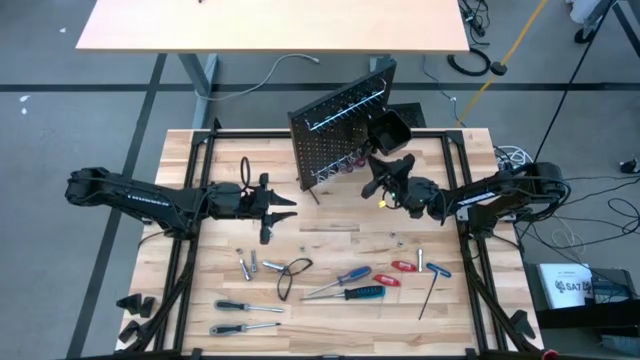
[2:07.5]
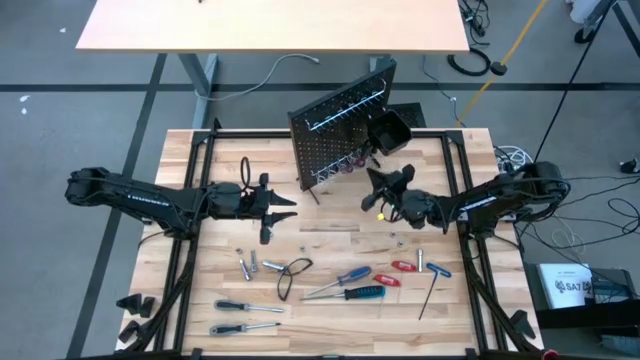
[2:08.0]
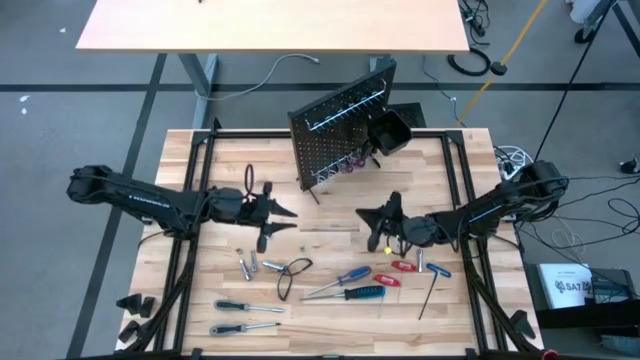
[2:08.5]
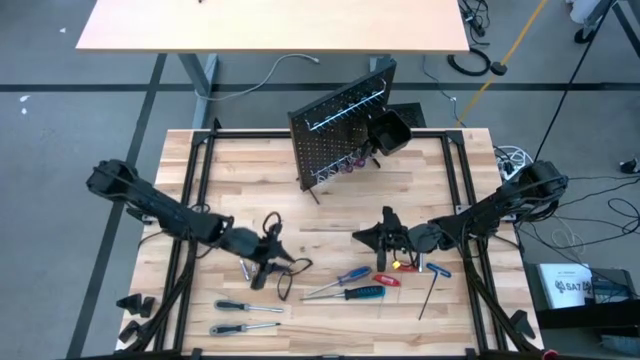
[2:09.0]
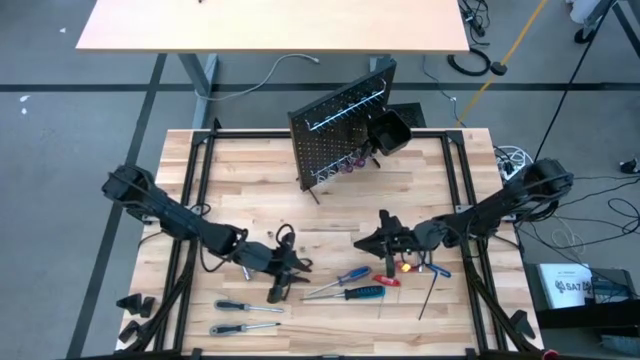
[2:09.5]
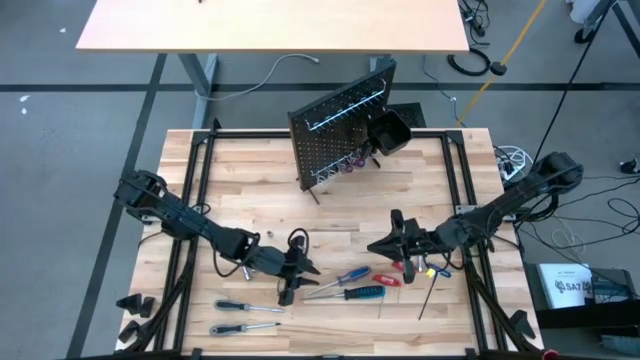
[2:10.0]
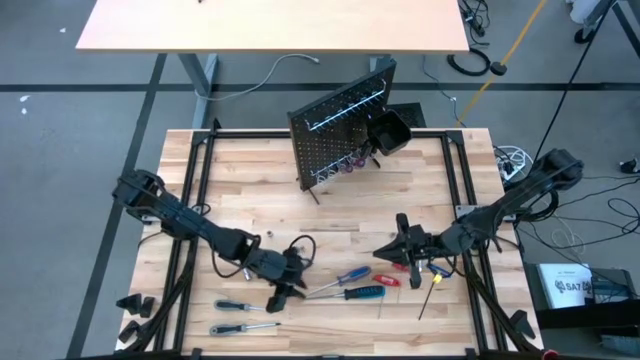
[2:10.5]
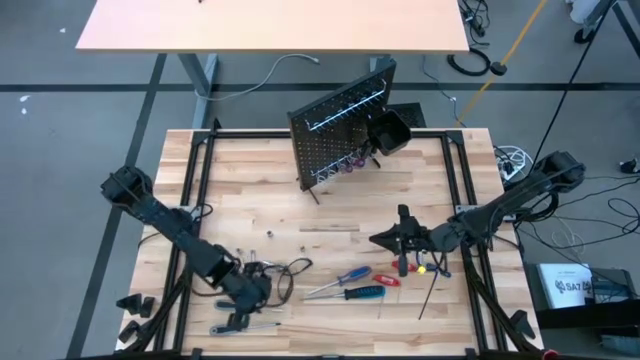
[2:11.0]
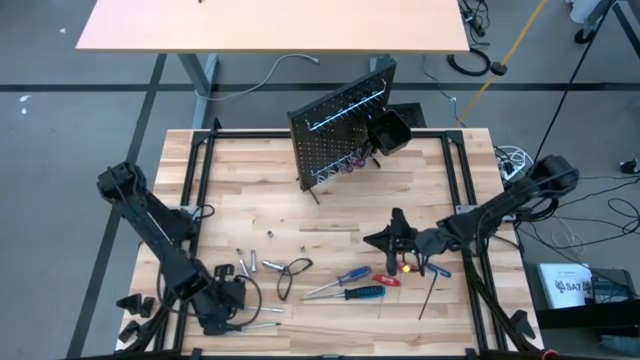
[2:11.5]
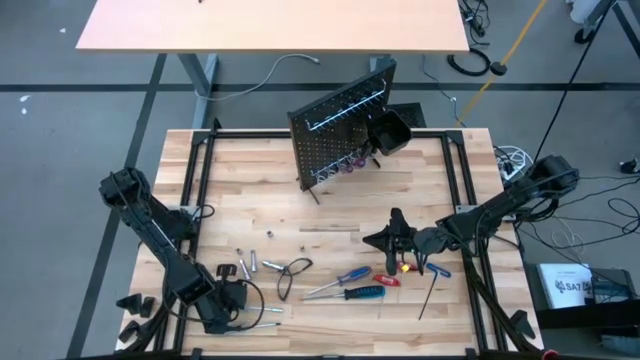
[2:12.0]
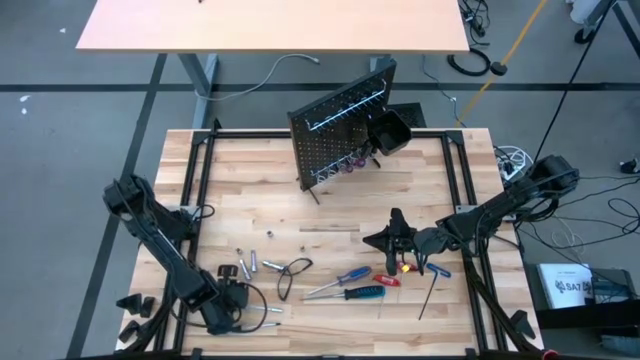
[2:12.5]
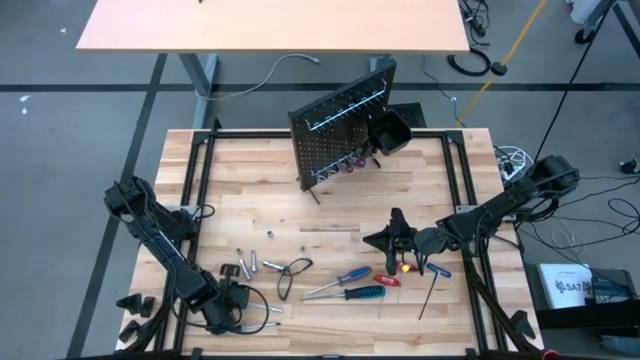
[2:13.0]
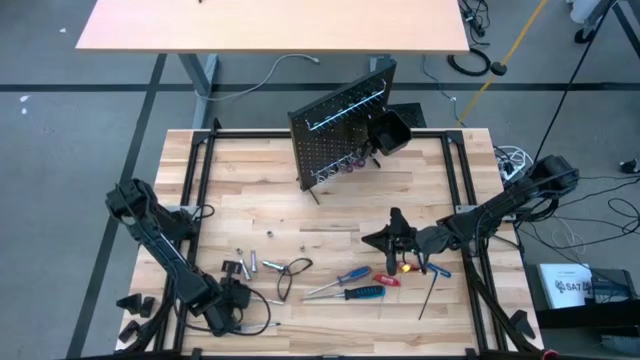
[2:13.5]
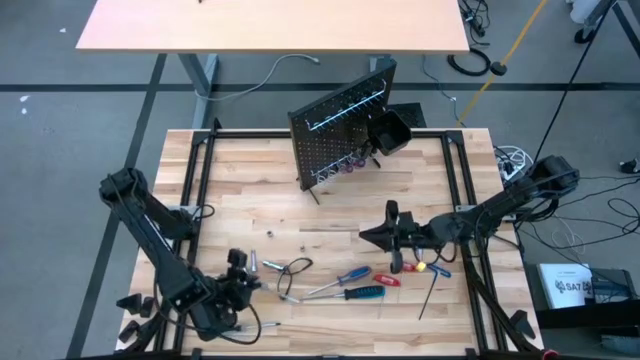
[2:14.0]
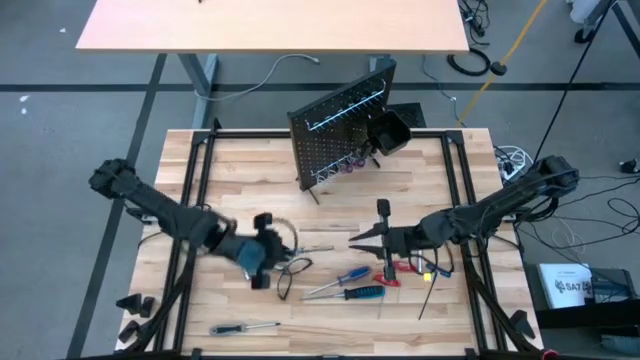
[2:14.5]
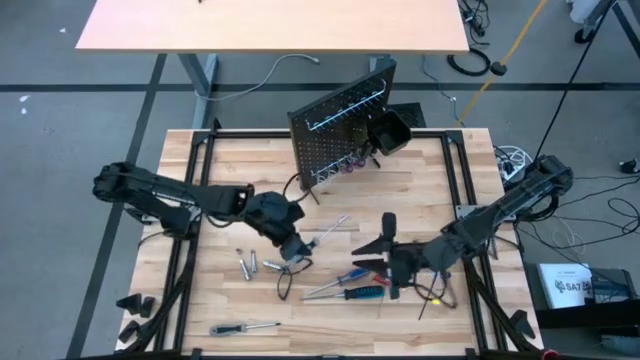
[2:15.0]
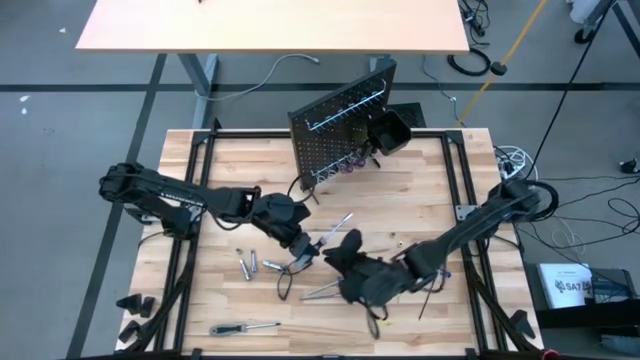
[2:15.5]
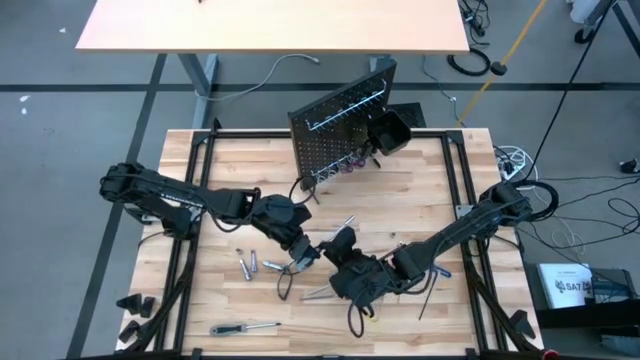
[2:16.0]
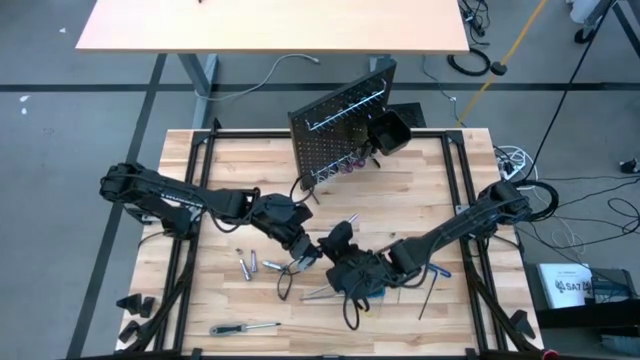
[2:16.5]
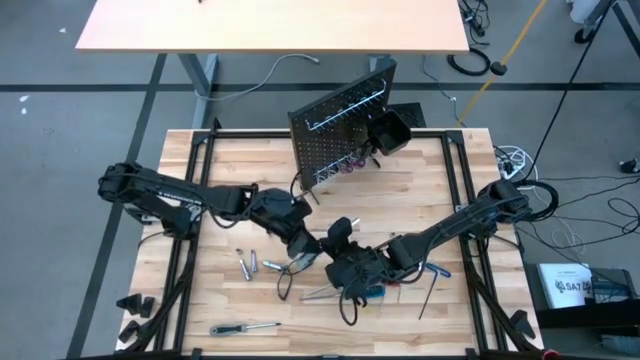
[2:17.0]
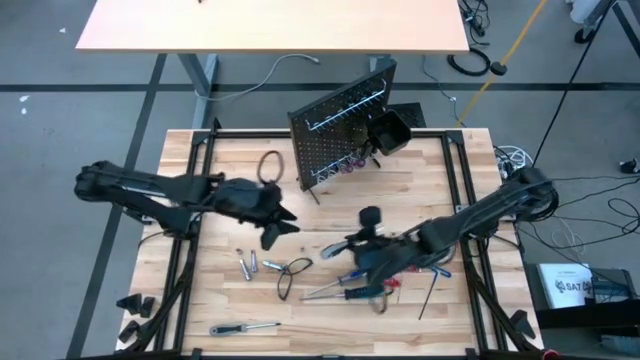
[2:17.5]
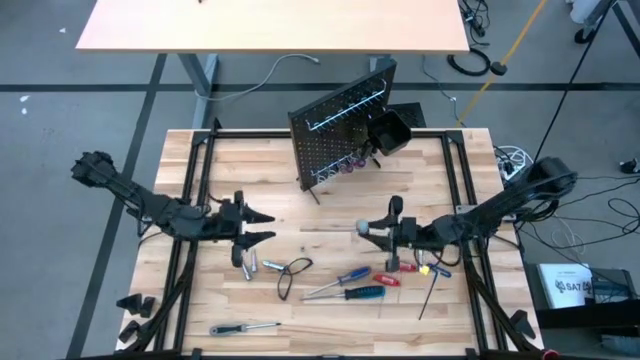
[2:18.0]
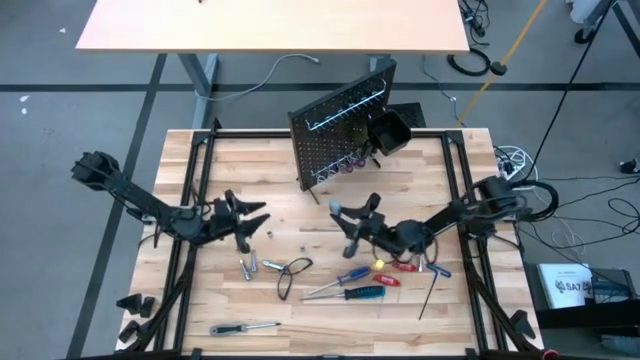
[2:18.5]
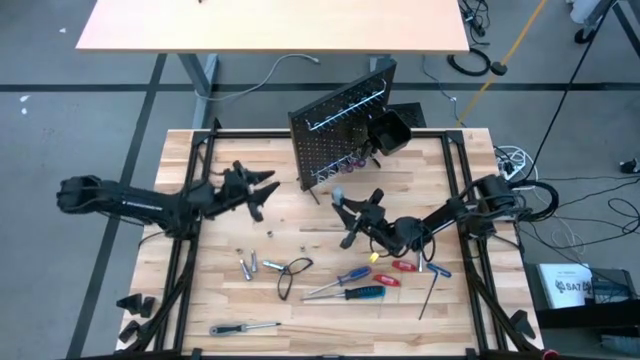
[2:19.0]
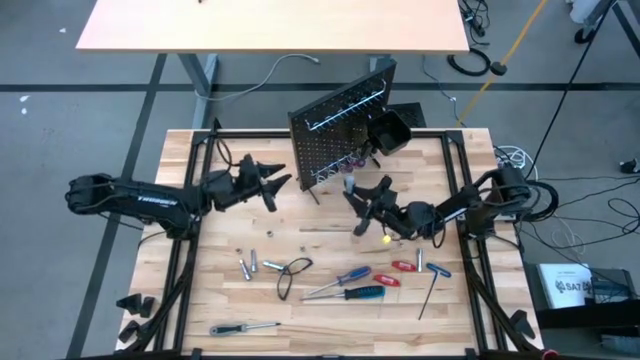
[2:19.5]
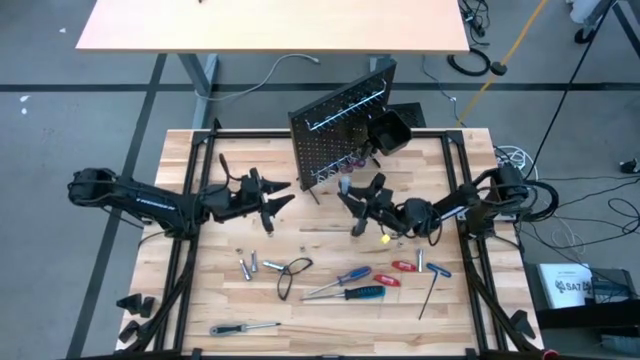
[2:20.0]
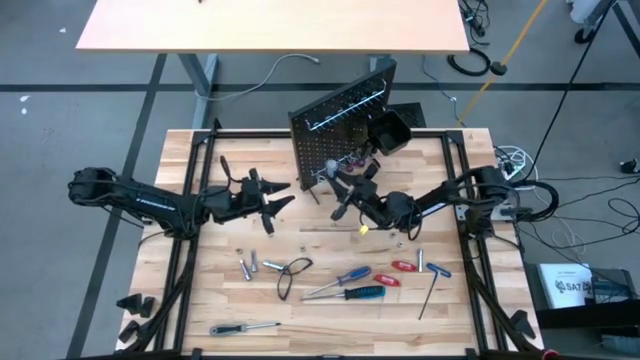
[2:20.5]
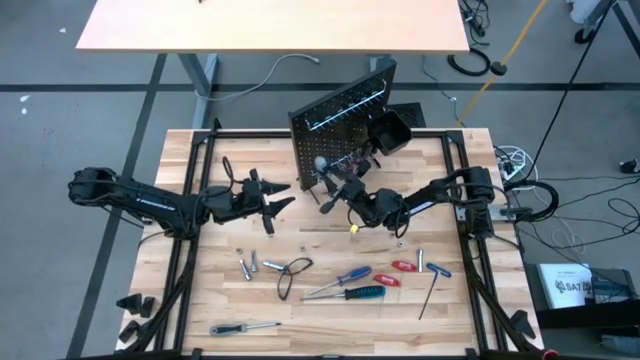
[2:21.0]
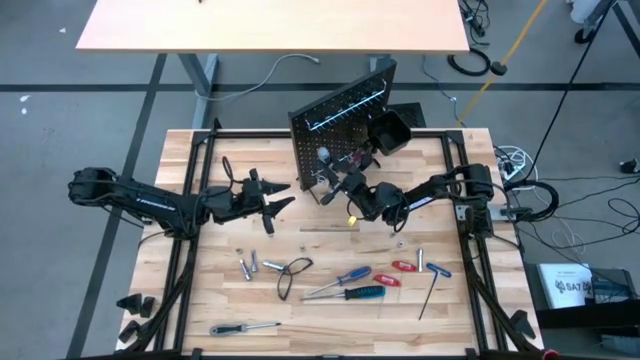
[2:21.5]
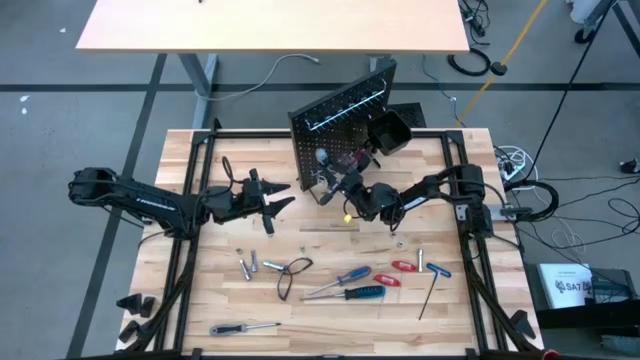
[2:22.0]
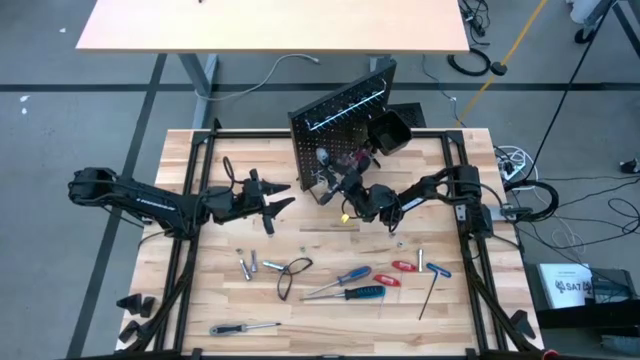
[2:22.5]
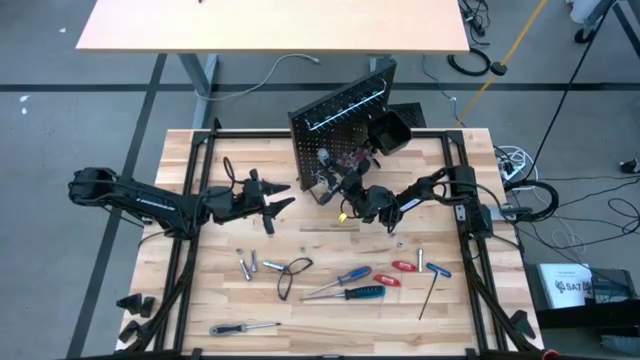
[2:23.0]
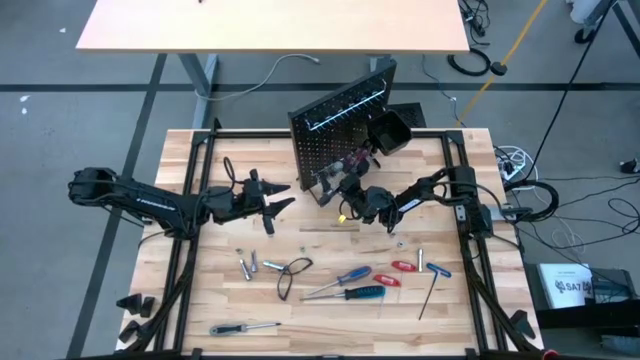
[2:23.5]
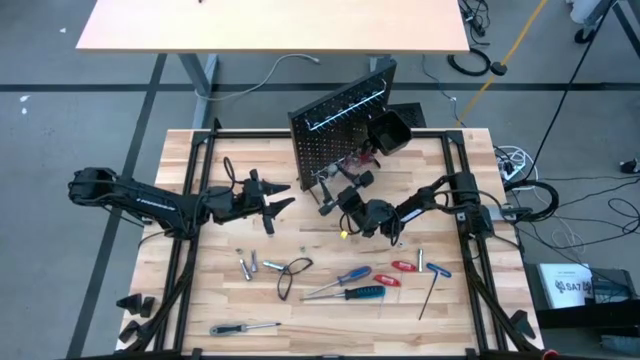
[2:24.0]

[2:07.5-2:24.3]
Task: Hang tools onto peg board
Hang the top gray black screwdriver on the peg board

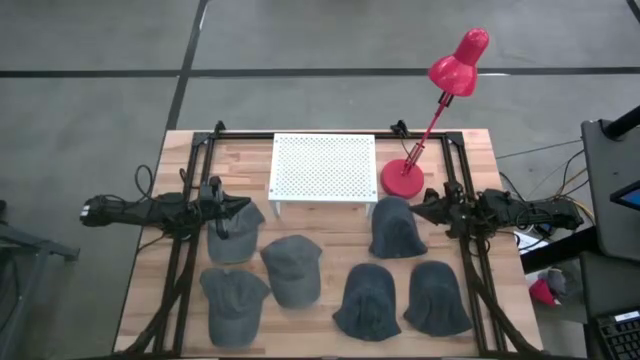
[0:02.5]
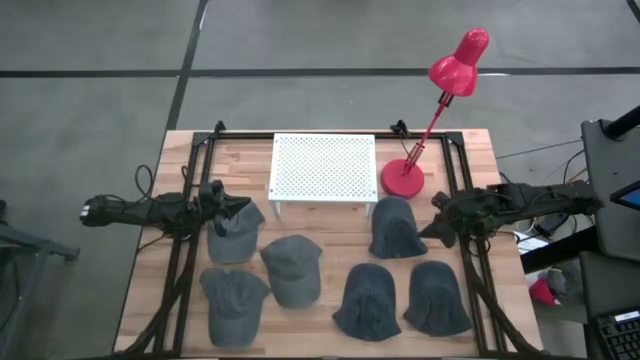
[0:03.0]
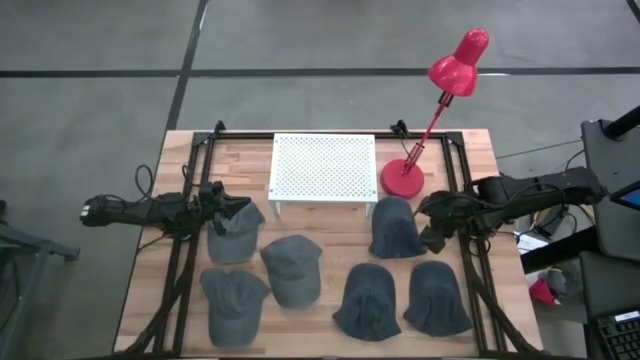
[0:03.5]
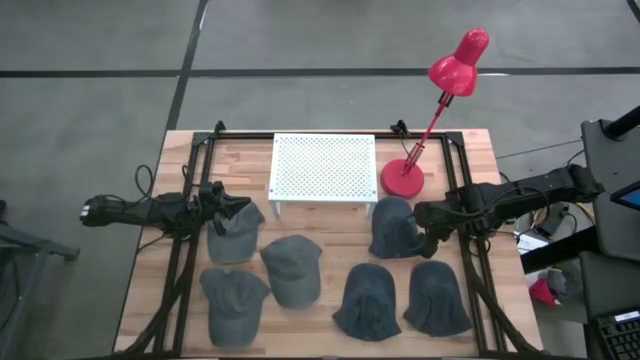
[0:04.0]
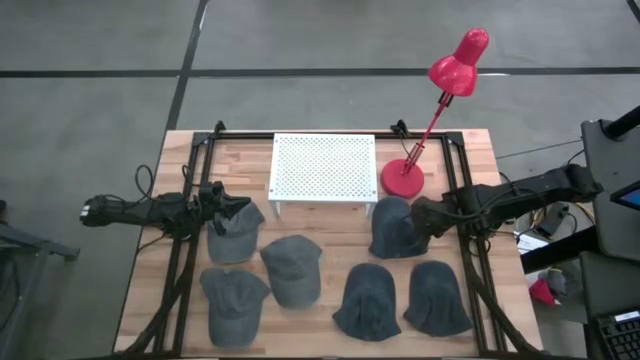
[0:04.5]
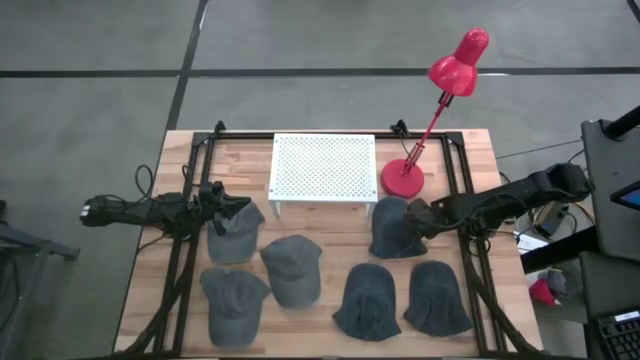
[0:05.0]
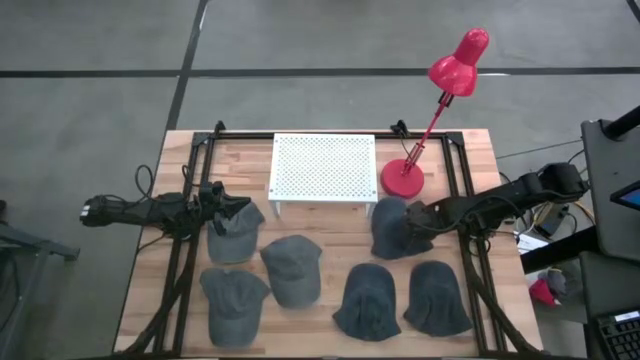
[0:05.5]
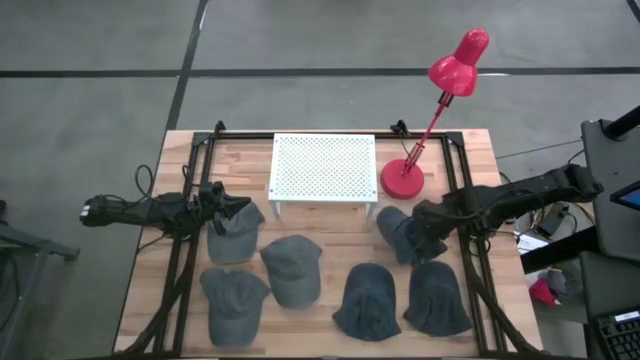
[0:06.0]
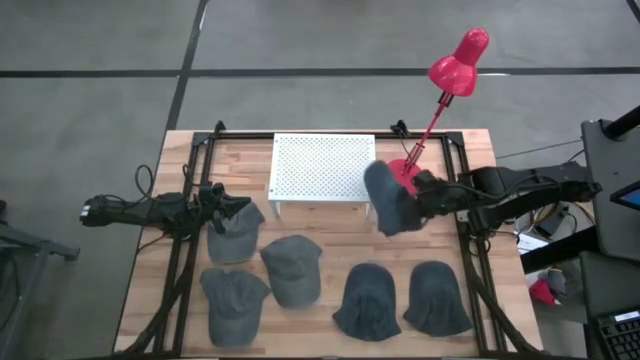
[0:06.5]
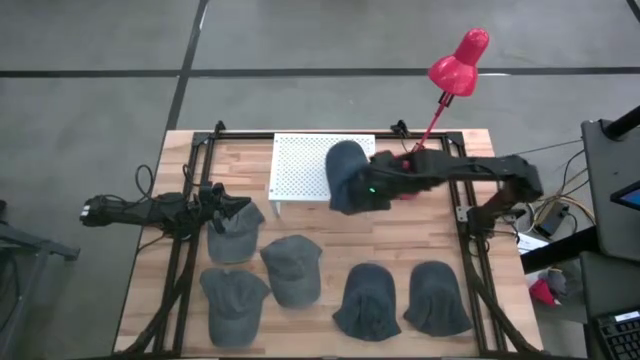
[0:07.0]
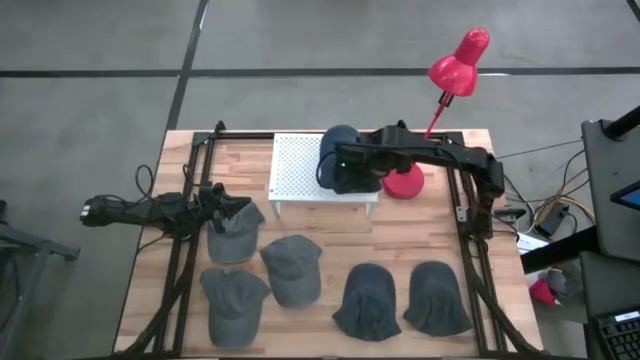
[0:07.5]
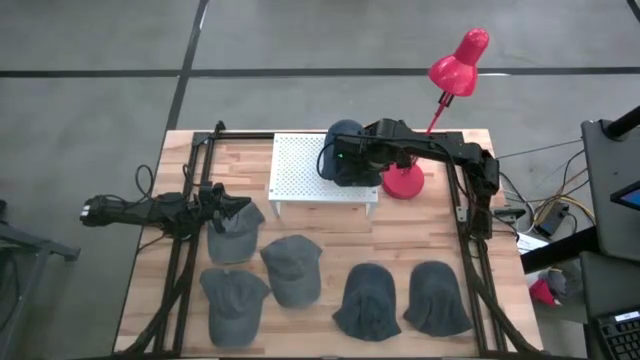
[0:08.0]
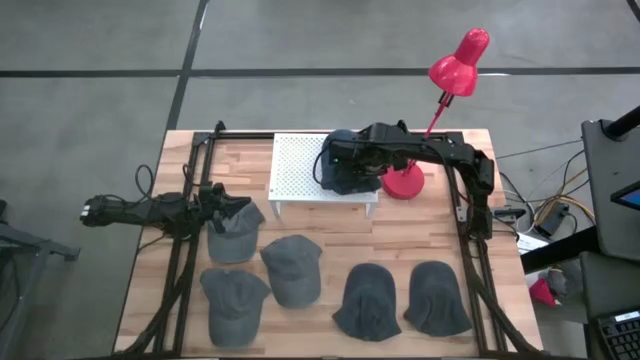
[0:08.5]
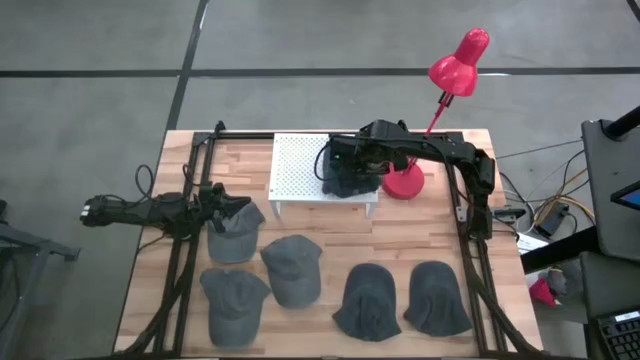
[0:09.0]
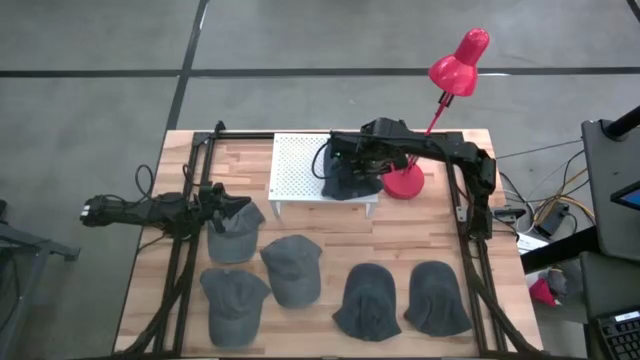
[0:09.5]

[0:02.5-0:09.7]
Task: Pick & Place hat
Put the blue cap on the shelf
